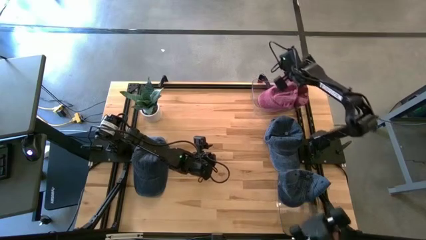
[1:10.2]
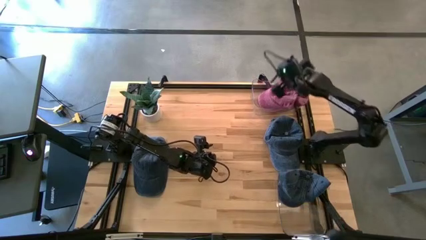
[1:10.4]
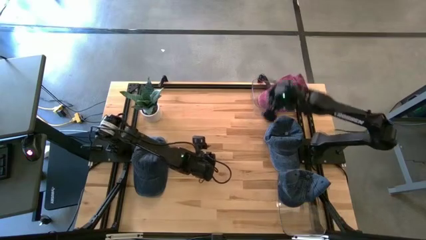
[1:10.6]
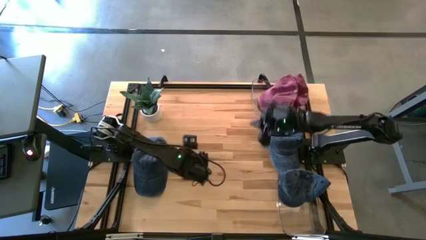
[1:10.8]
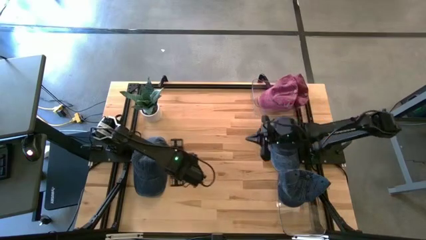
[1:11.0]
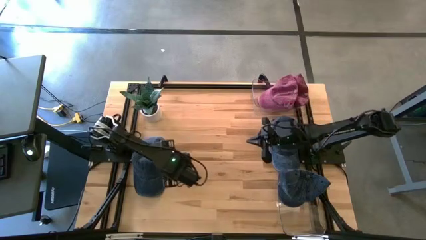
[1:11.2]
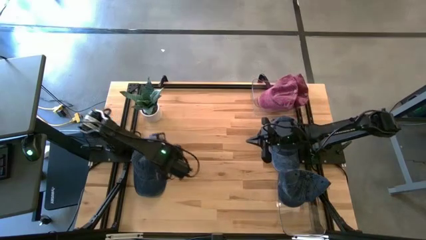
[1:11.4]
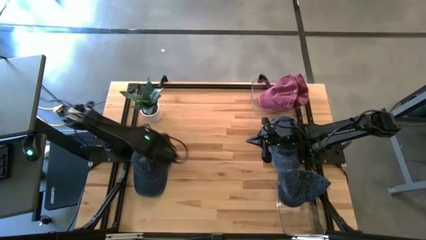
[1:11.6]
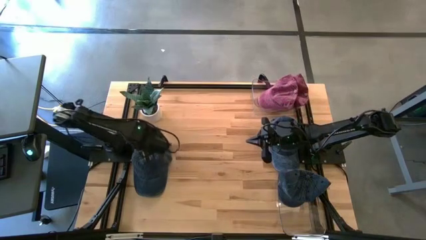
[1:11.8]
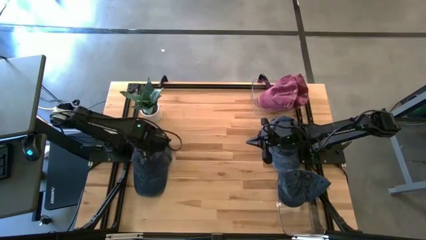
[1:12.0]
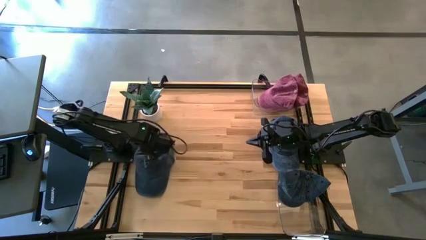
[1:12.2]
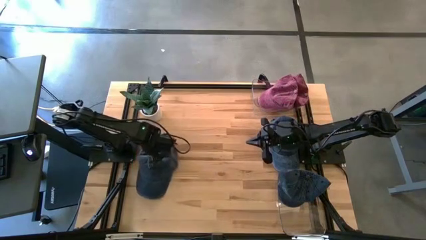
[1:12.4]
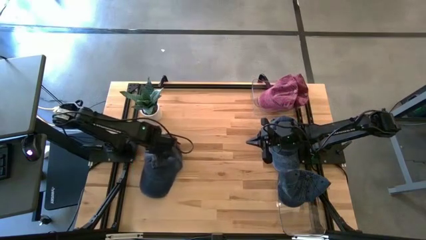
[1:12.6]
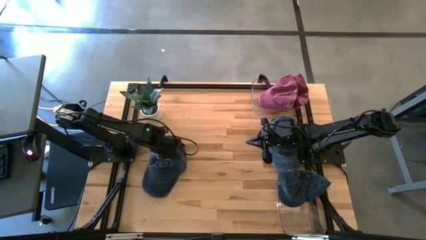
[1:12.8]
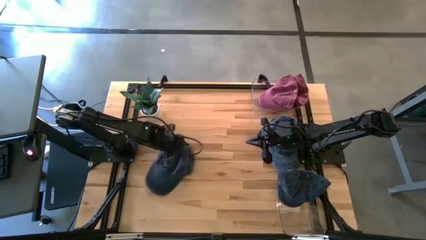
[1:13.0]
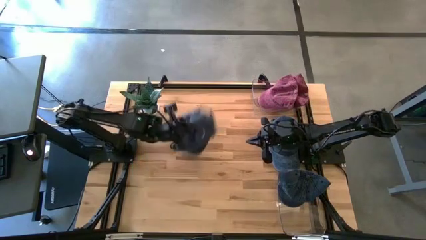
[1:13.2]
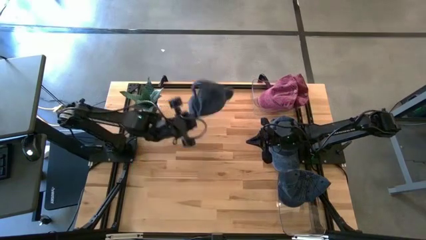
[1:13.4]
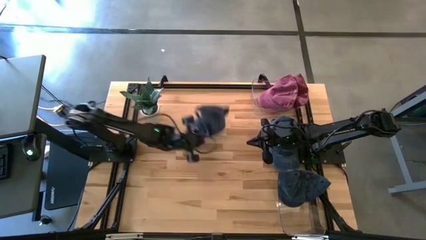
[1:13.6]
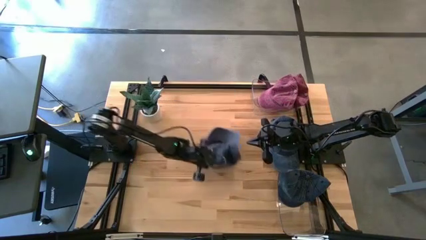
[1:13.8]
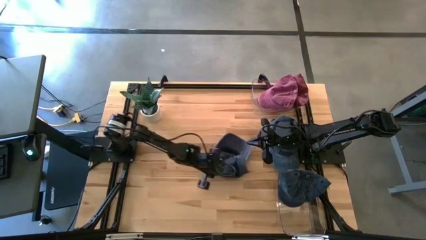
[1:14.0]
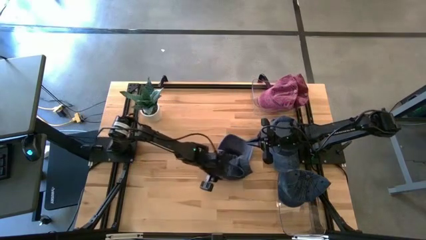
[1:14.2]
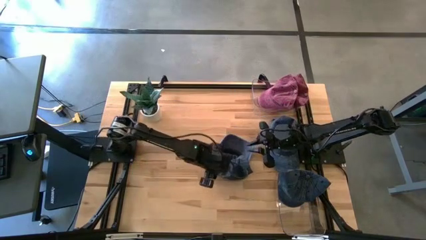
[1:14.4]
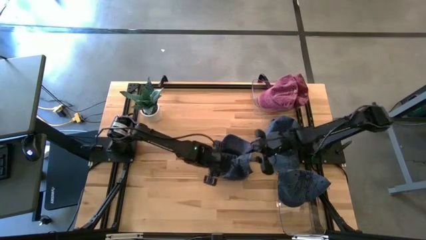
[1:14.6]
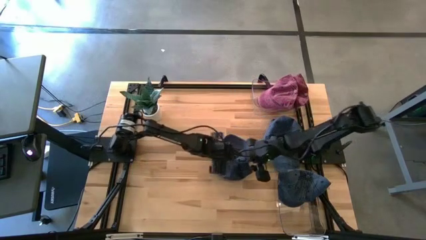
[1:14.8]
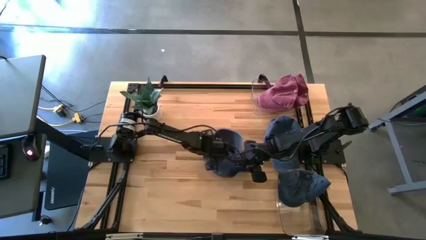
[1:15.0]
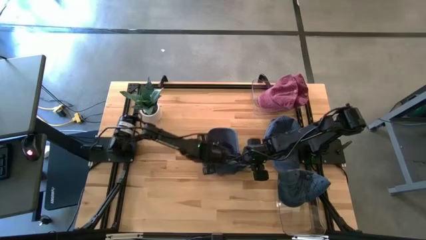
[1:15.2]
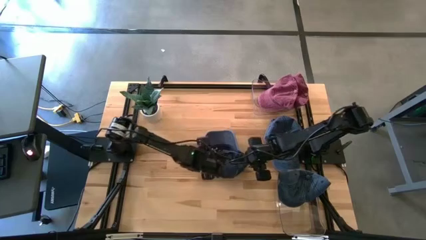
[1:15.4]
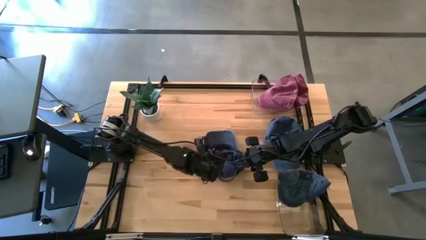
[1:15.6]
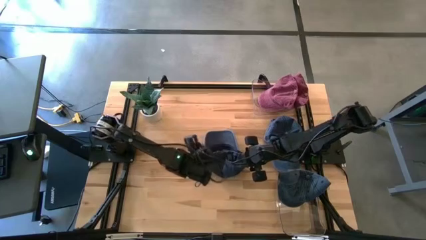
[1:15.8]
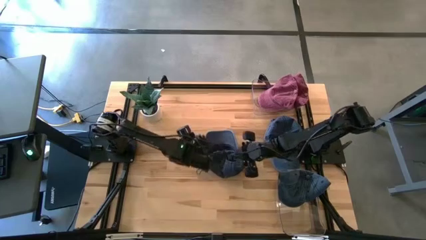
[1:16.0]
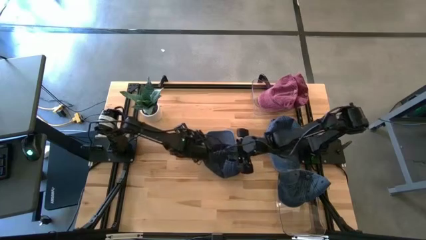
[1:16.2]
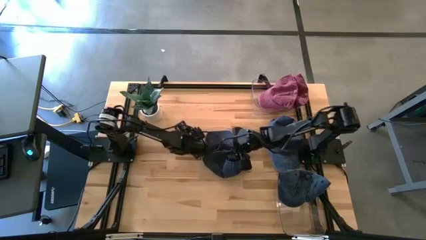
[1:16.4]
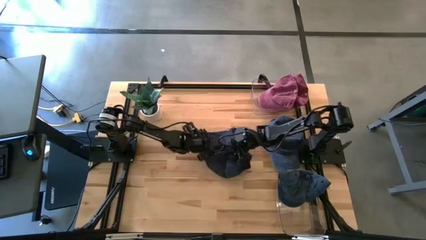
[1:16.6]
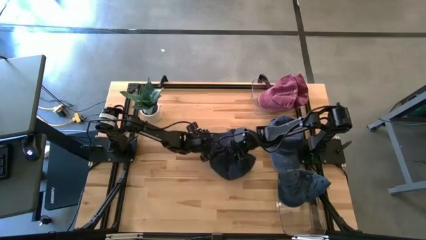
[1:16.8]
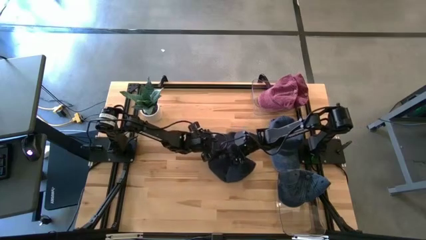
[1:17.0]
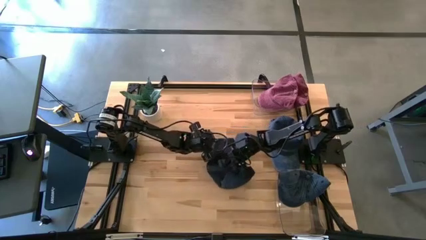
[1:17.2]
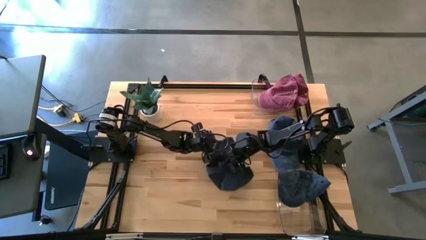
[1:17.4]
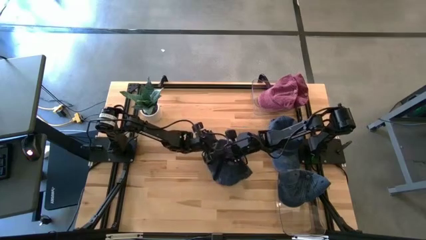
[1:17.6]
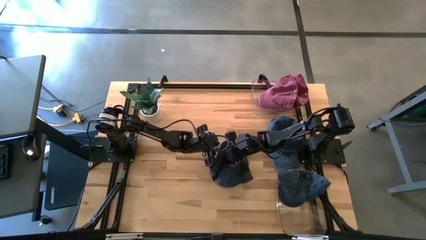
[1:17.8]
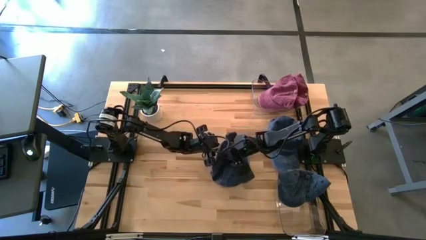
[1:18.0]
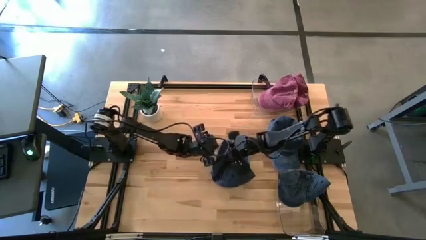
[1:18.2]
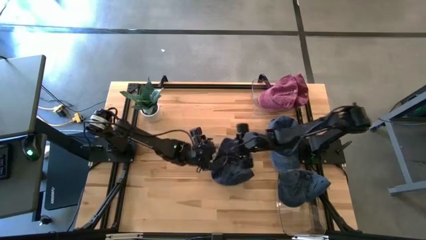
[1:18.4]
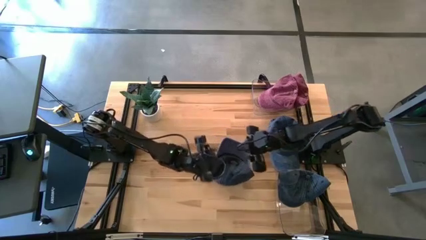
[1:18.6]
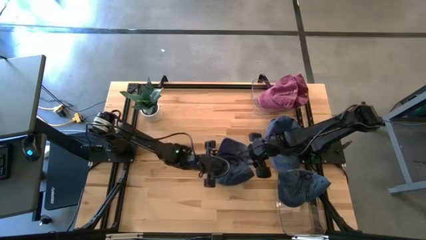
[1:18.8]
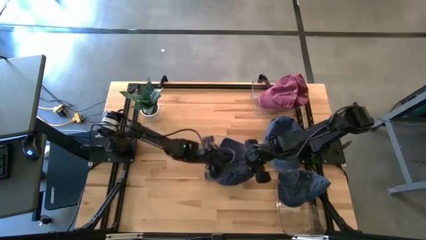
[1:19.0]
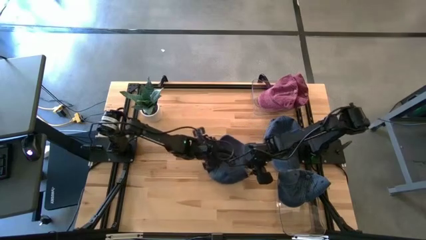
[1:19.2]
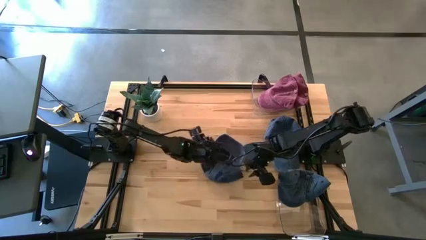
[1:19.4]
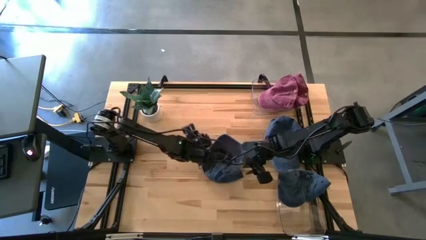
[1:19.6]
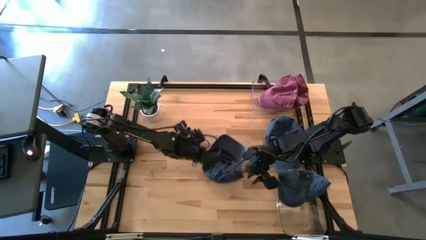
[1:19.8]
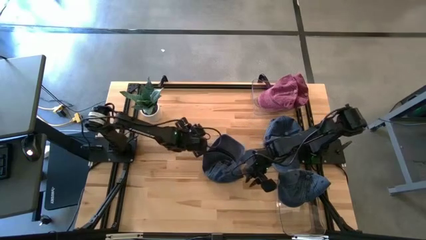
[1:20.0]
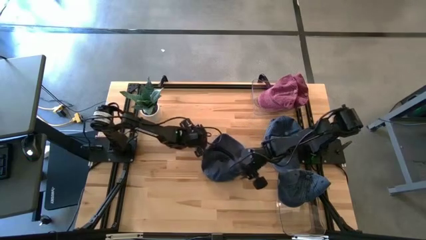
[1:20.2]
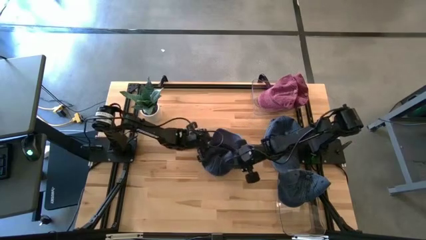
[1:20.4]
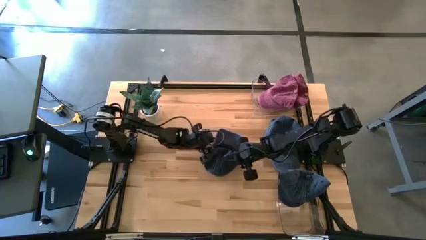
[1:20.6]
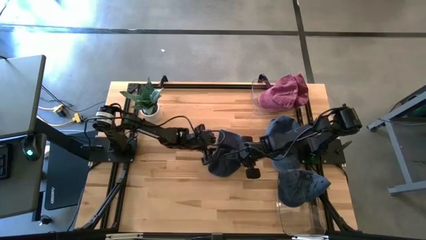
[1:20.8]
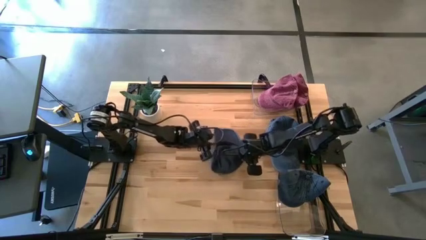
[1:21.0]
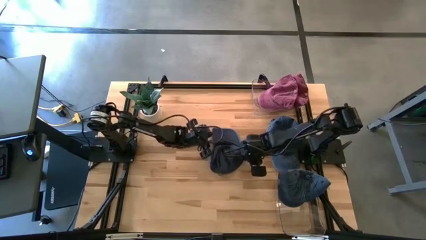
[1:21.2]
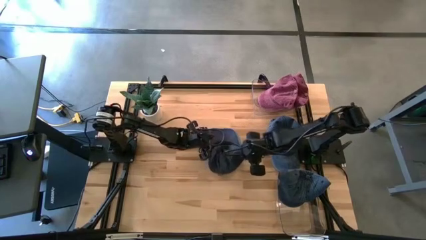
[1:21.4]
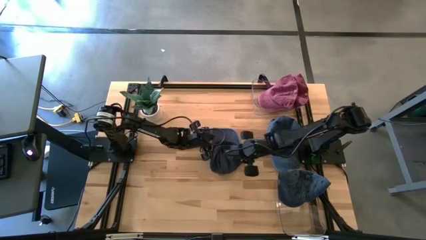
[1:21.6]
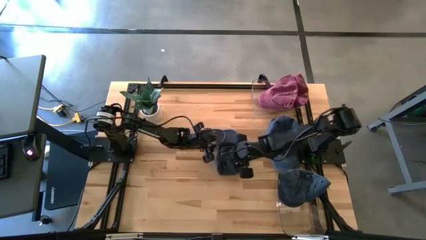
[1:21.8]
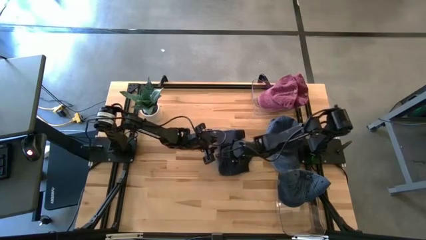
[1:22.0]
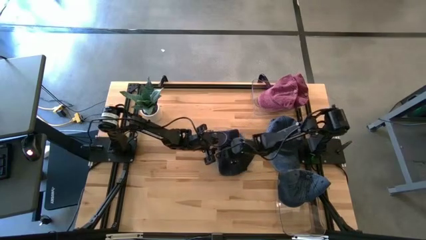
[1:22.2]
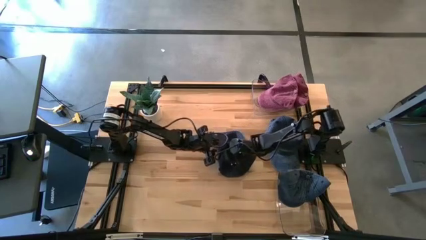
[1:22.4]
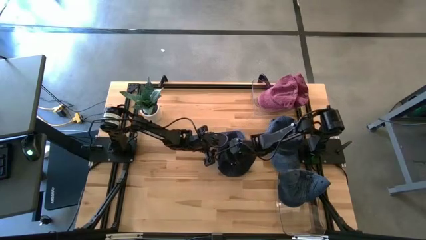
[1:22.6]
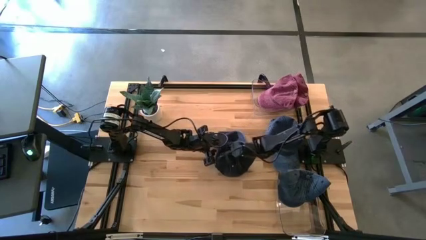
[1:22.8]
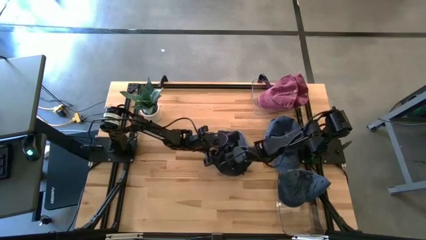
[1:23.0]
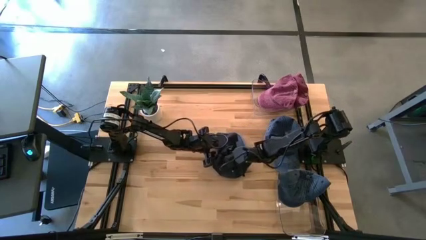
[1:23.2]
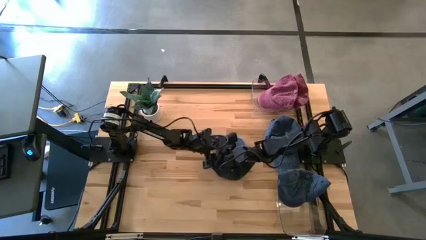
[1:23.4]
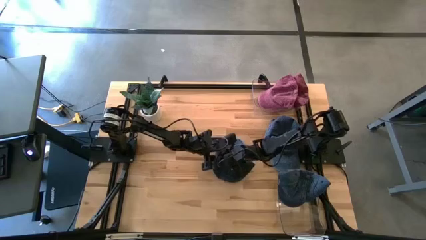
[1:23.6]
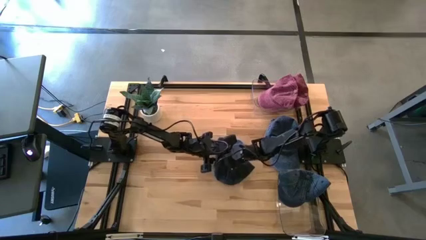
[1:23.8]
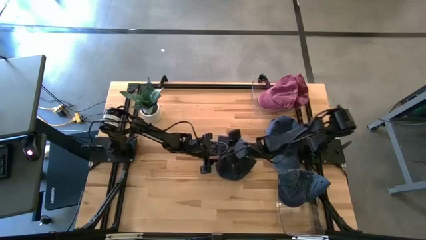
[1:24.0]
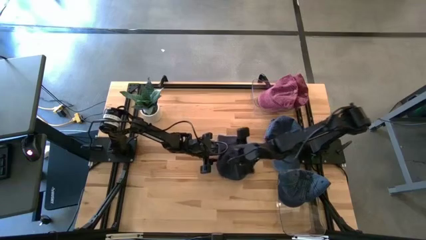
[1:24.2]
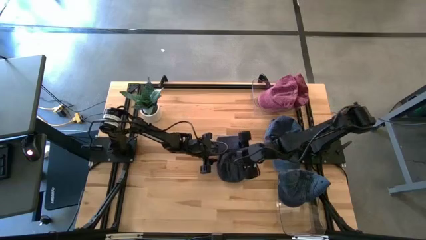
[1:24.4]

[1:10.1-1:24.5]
Task: Pick & Place hat
Put the left blue cap into the bottom transparent bin
